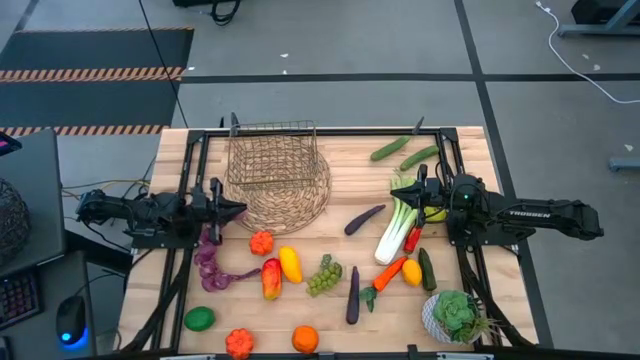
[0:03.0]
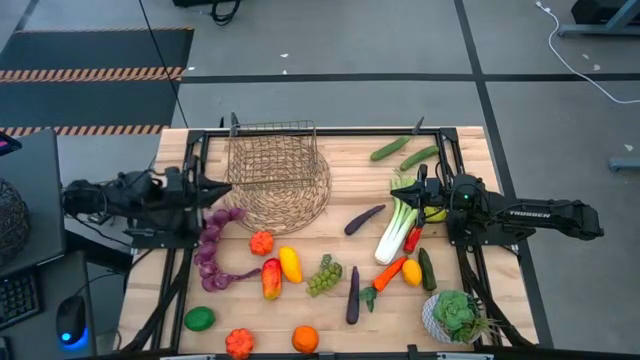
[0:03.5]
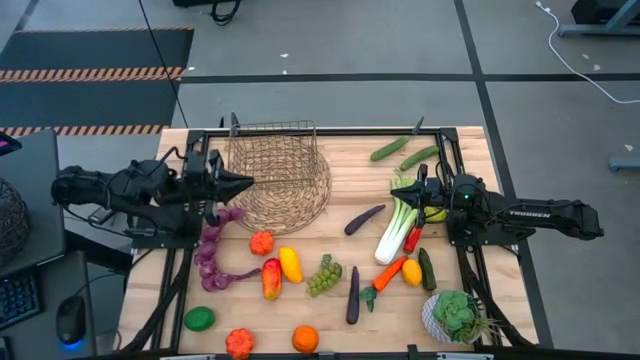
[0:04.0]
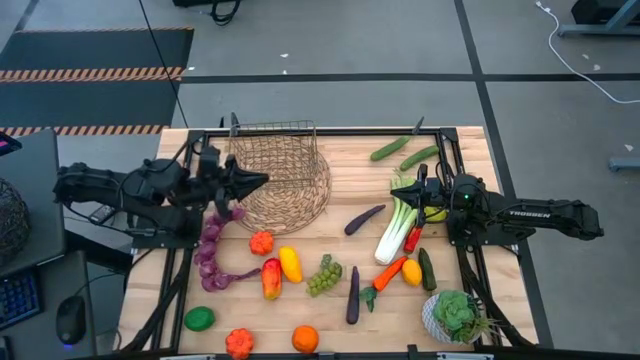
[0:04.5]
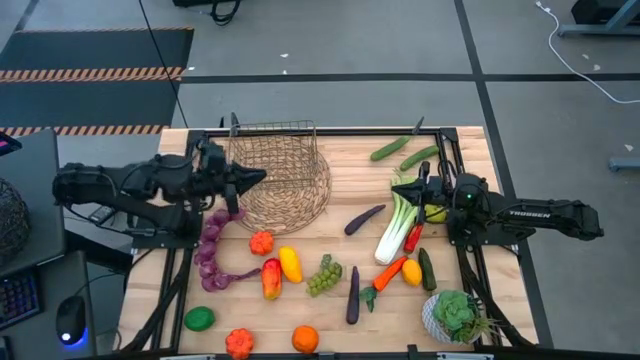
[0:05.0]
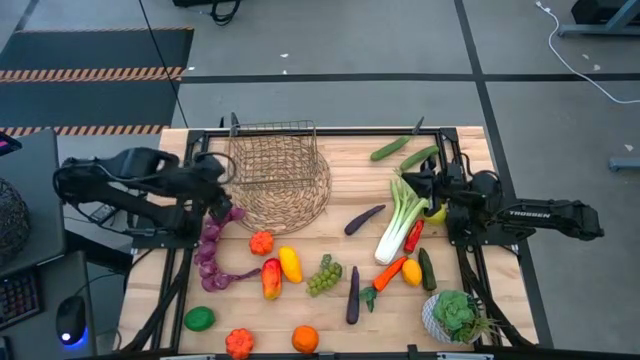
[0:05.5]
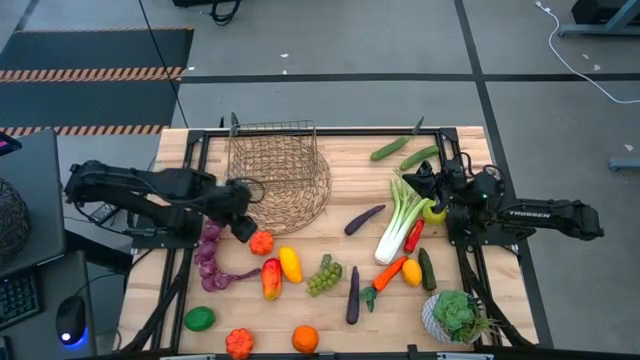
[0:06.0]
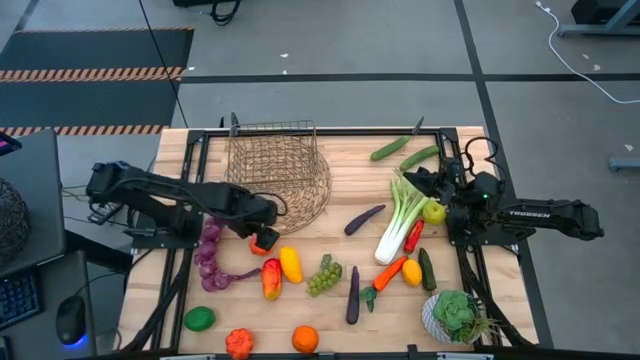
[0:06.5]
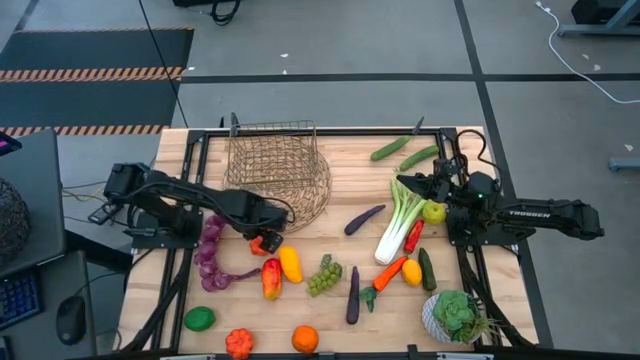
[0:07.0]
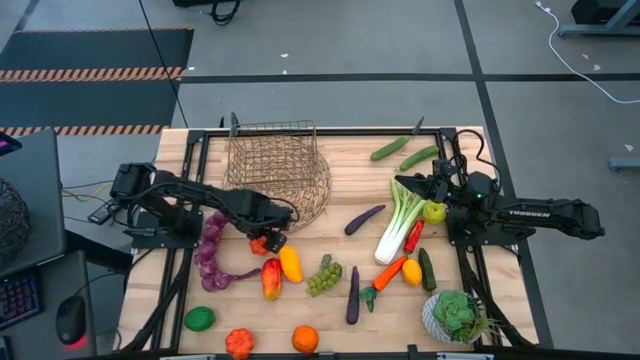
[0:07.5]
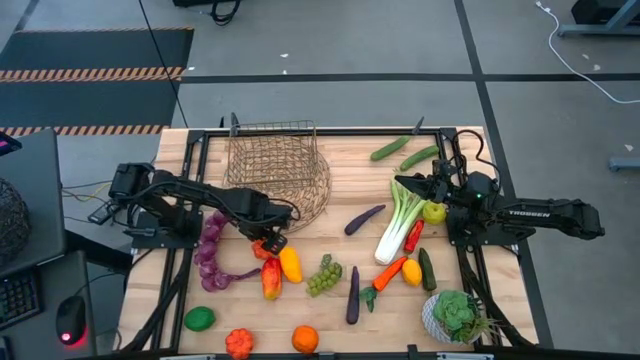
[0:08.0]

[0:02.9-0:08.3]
Task: Build produce basket
Put the top orange pumpkin into the wire basket

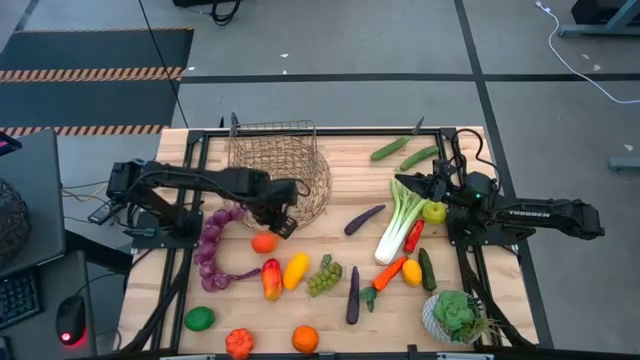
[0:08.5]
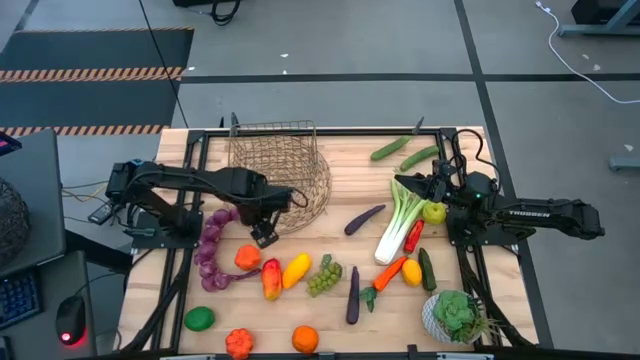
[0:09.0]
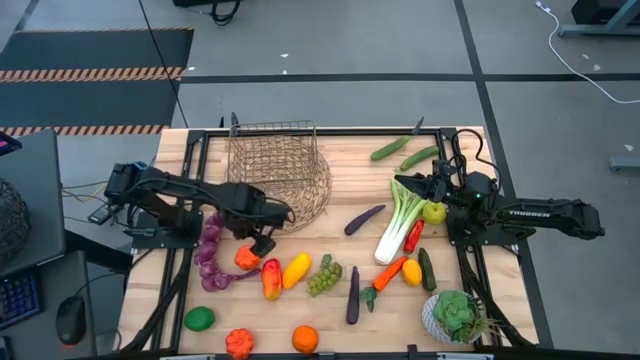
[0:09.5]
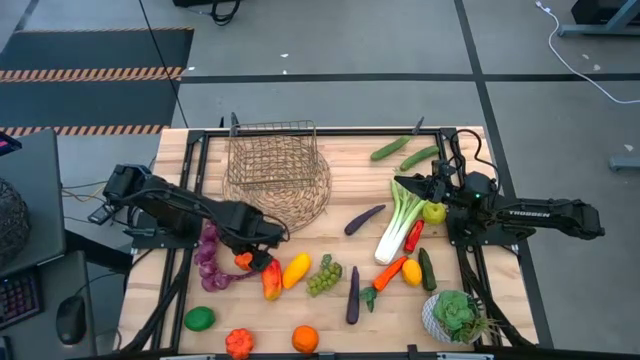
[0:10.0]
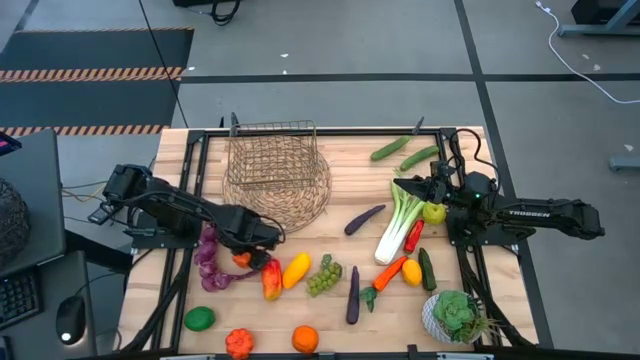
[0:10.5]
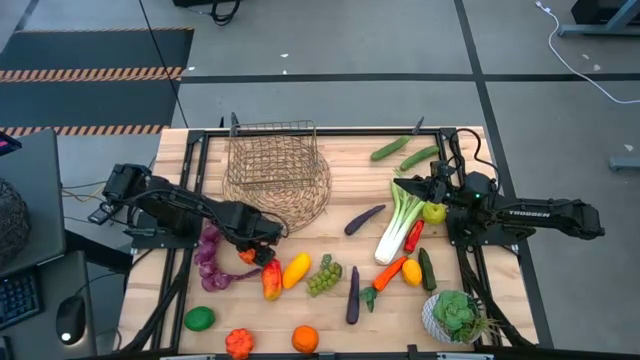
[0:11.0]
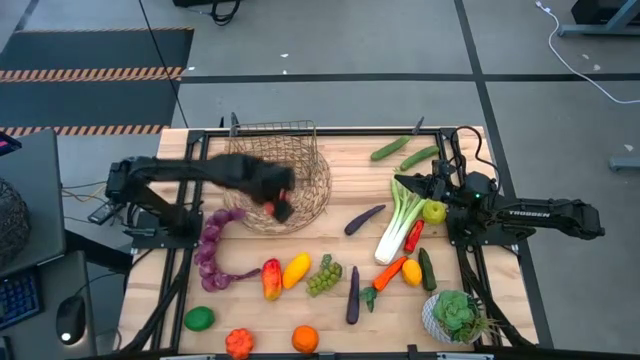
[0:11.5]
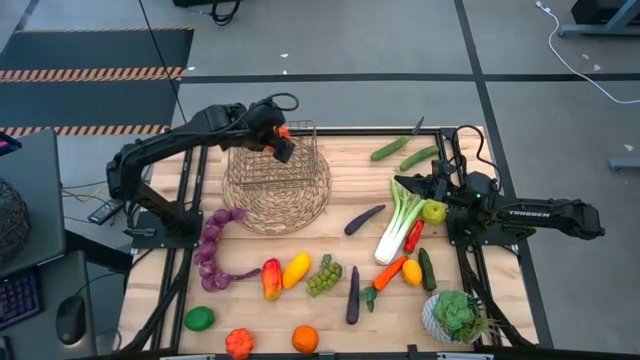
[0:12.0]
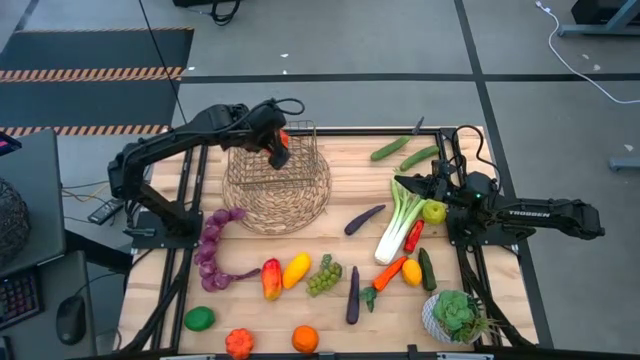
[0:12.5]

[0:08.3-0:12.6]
Put the top orange pumpkin into the wire basket

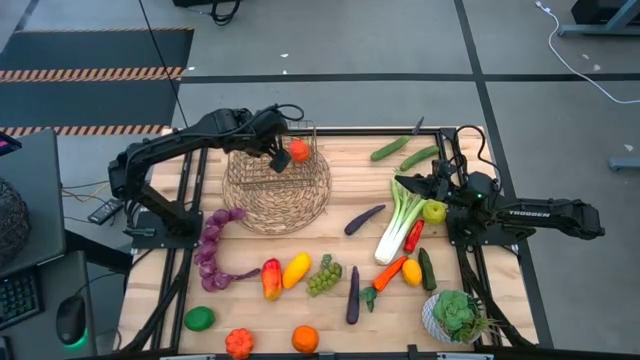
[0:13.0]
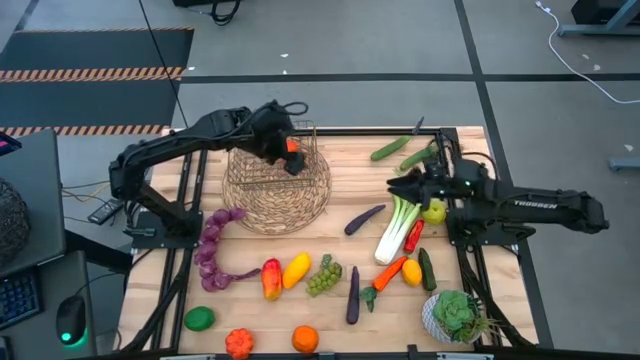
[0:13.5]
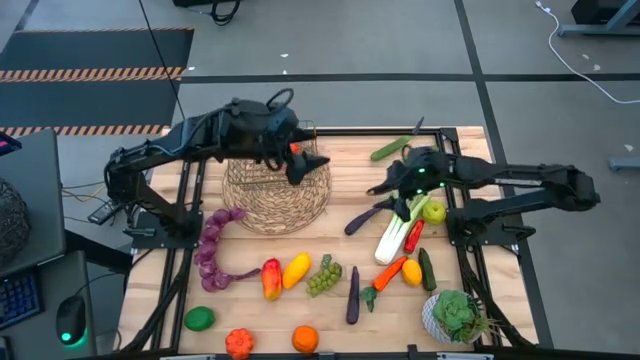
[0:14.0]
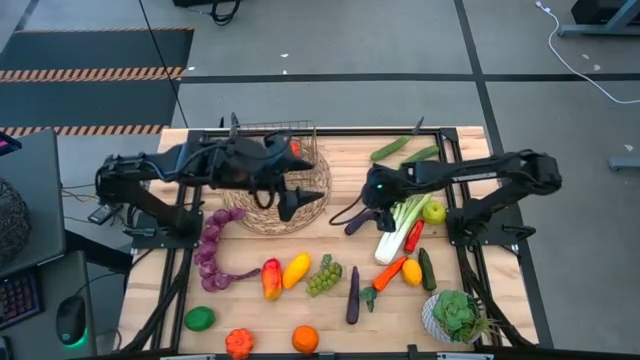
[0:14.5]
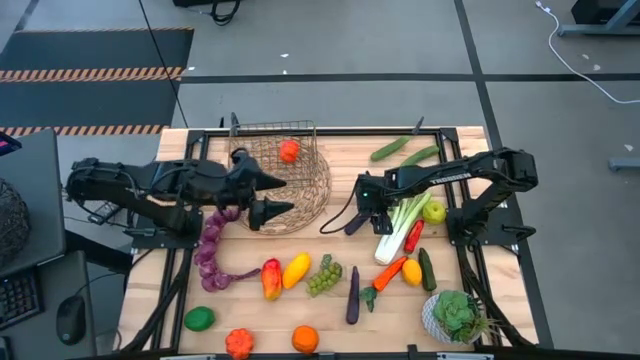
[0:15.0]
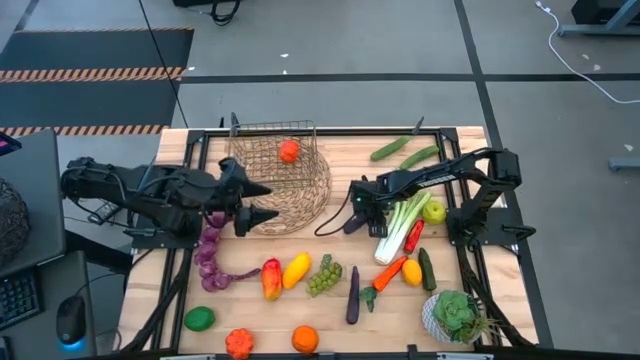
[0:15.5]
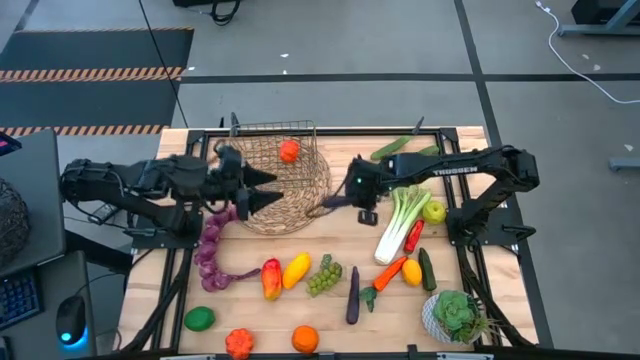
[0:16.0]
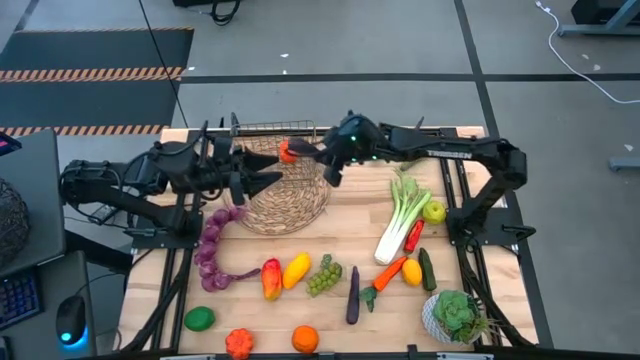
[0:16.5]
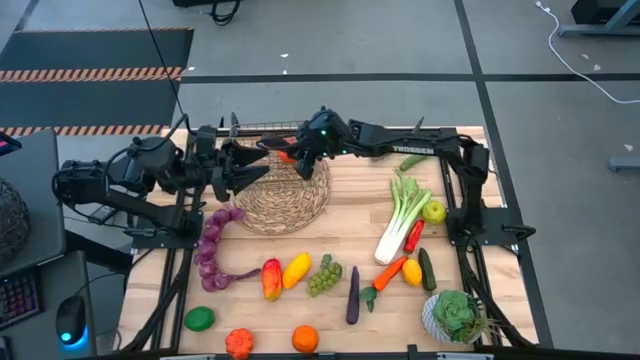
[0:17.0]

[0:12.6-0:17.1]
Put the top purple eggplant into the wire basket

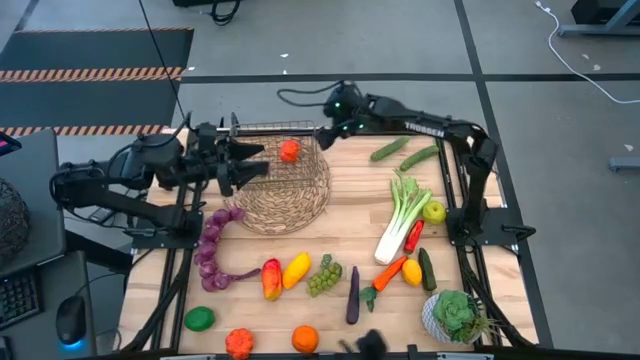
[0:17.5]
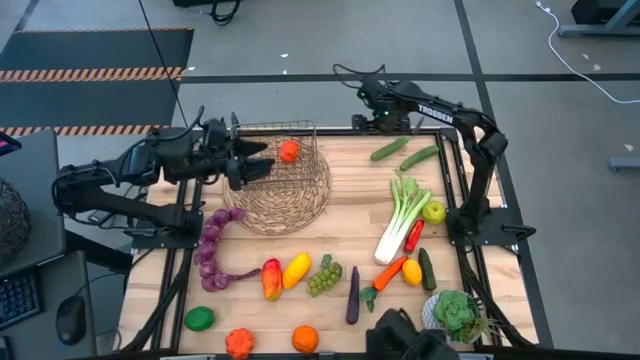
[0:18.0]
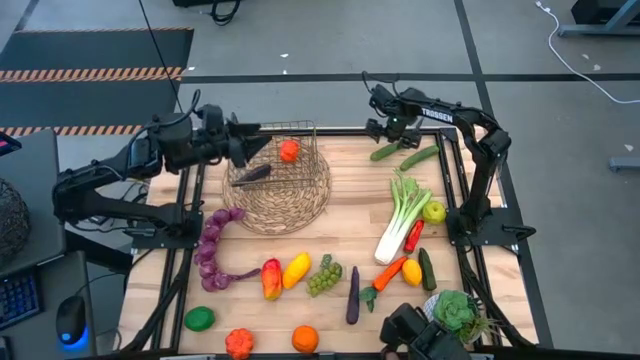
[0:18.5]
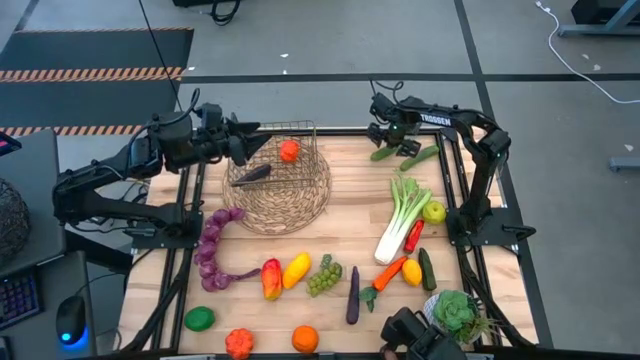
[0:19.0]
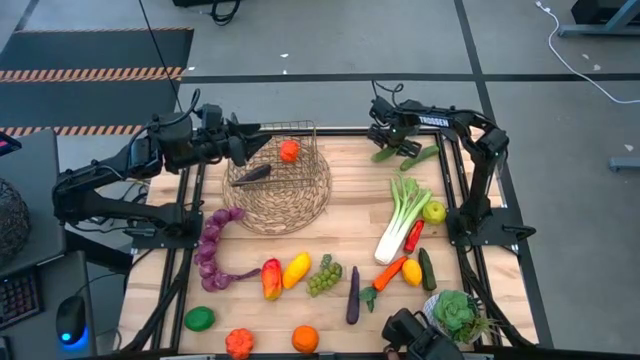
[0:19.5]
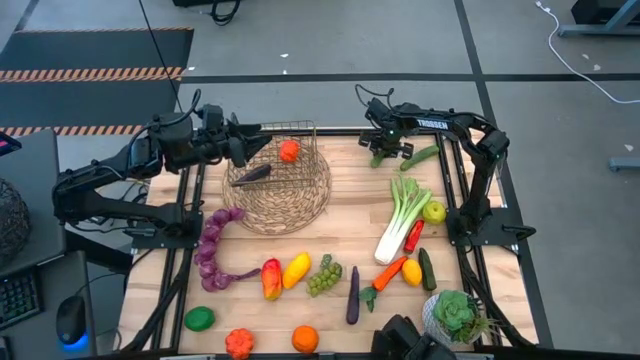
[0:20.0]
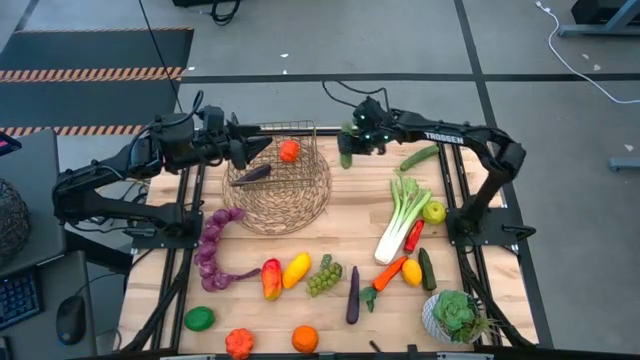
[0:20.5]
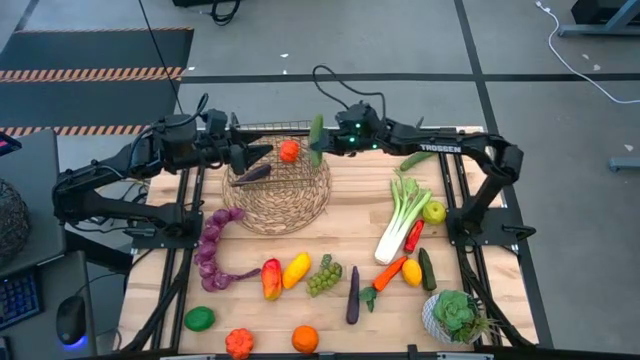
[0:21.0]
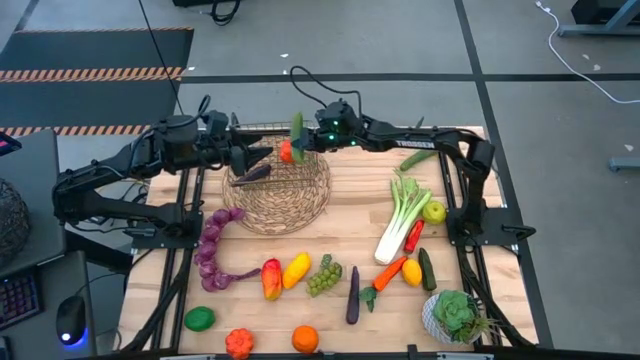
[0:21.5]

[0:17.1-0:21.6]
Put the top left green cucumber into the wire basket

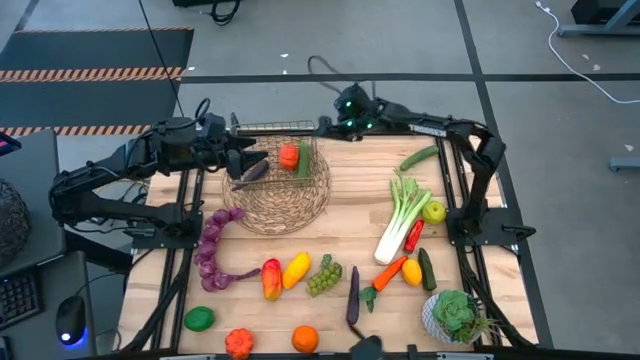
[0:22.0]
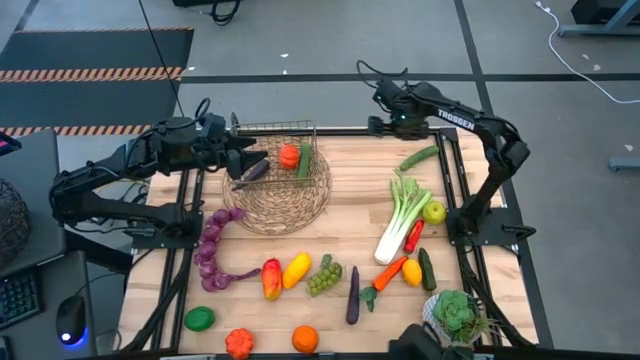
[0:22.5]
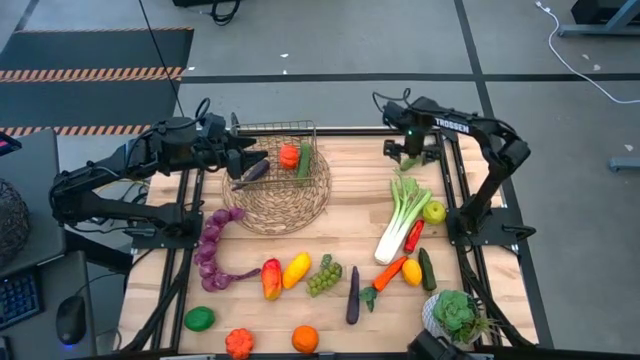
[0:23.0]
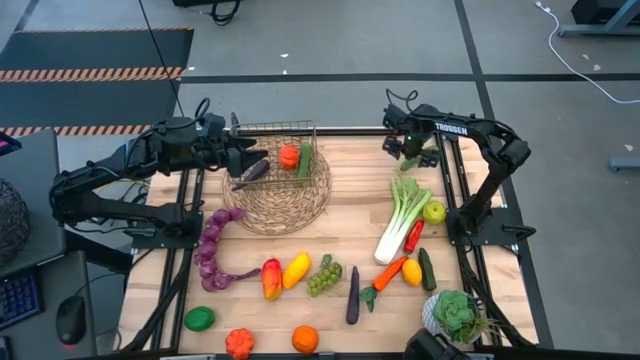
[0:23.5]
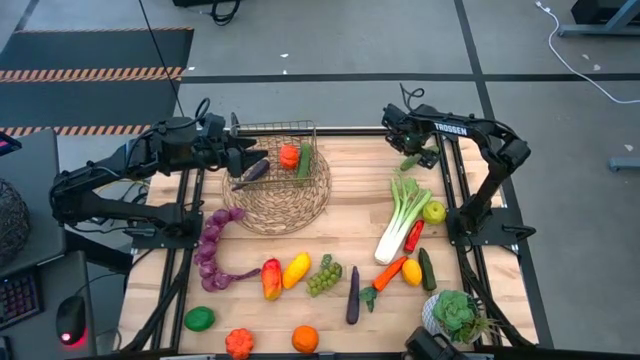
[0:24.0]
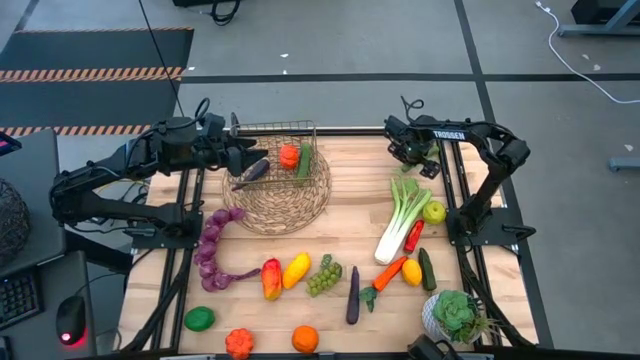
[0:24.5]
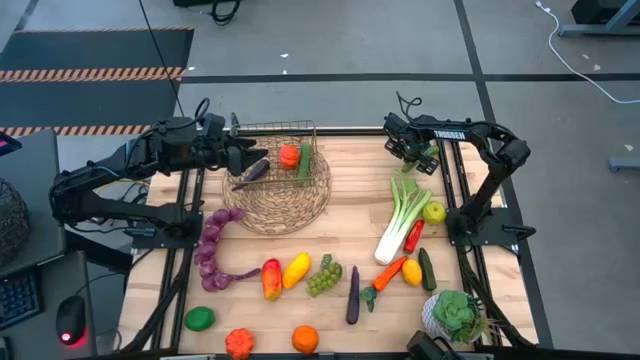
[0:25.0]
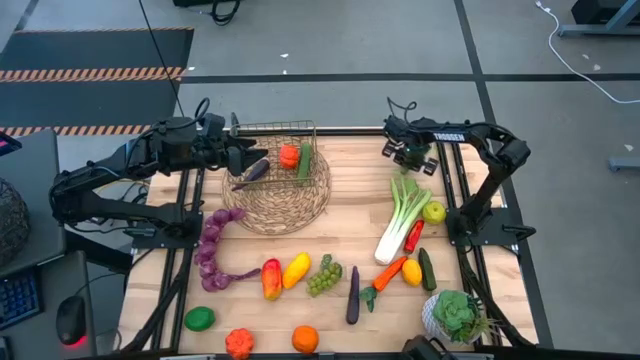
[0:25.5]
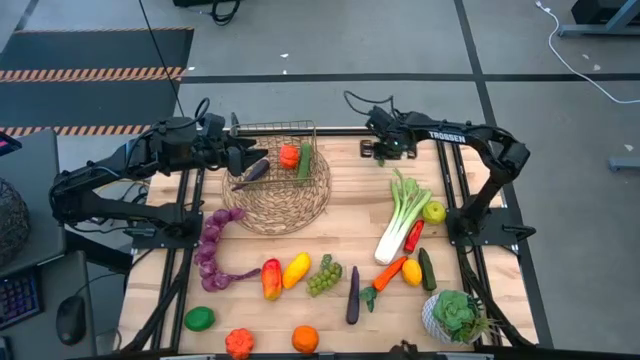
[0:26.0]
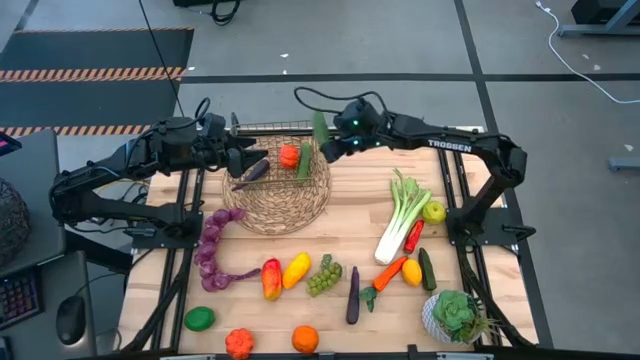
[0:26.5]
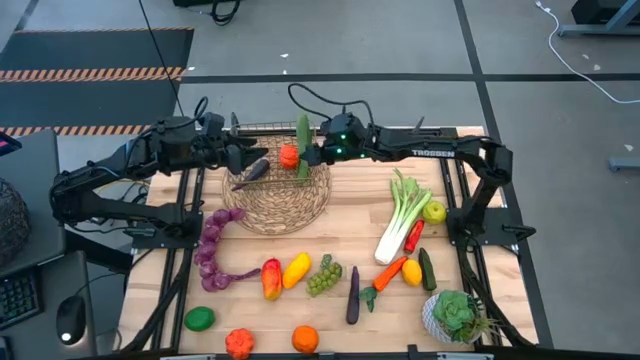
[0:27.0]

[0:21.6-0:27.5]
Put the top green cucumber into the wire basket
